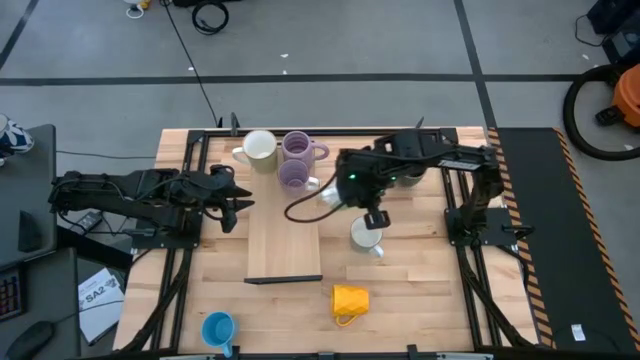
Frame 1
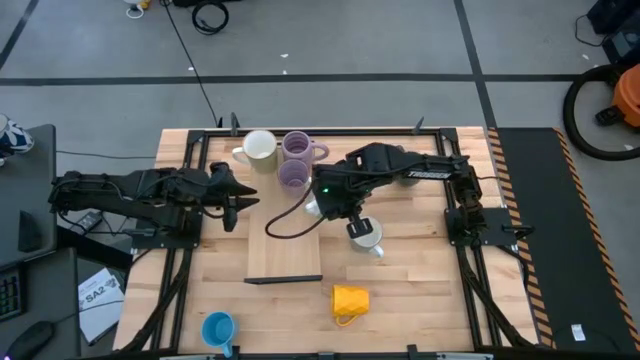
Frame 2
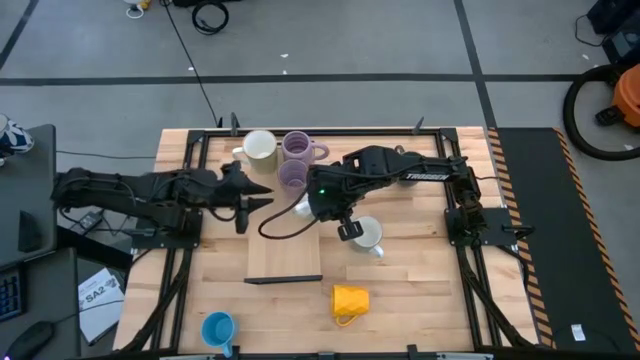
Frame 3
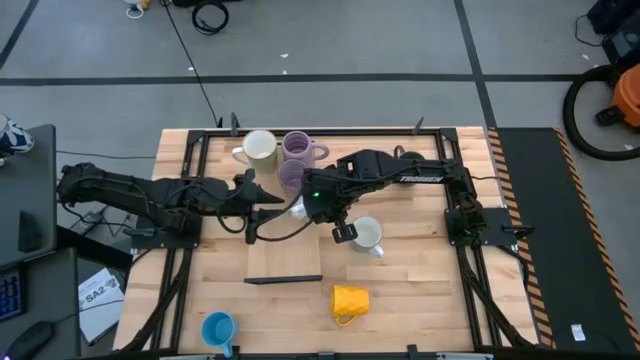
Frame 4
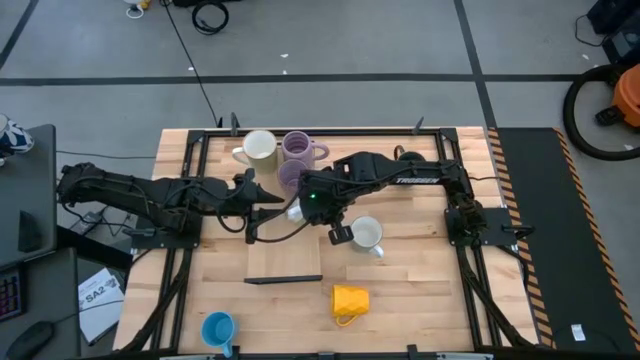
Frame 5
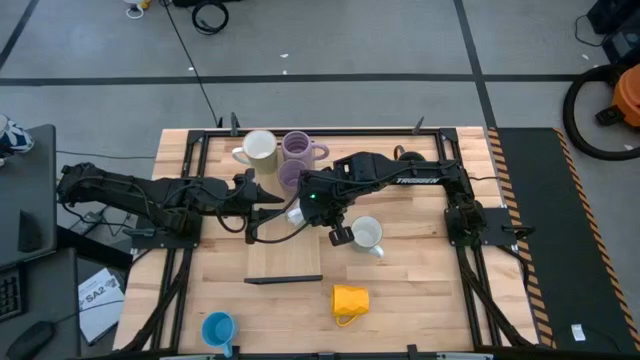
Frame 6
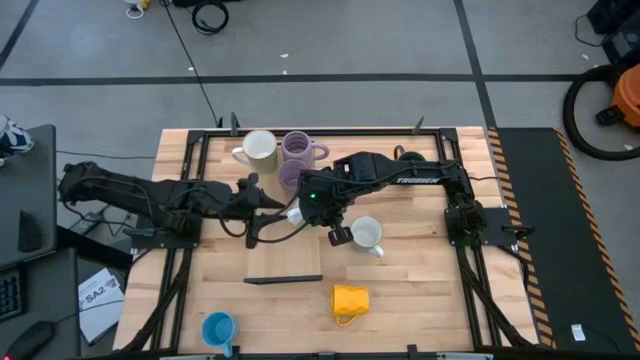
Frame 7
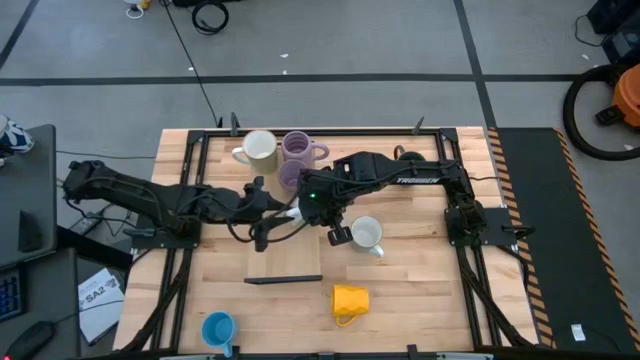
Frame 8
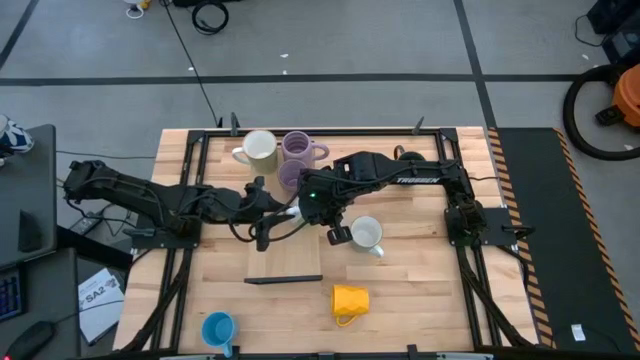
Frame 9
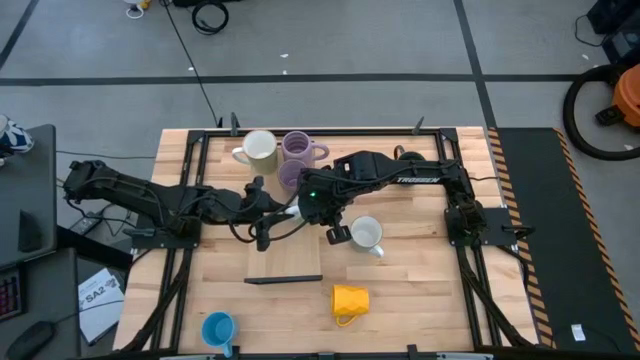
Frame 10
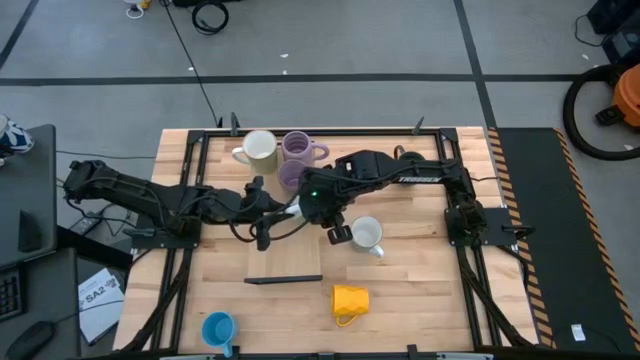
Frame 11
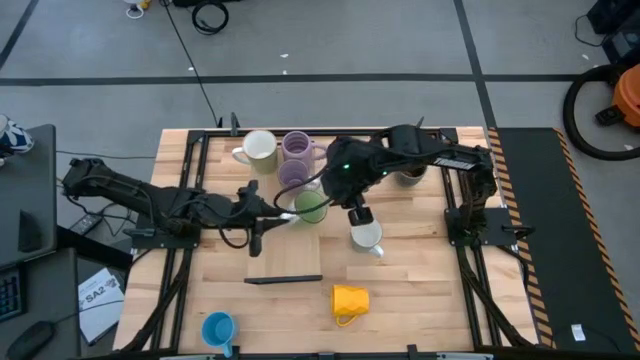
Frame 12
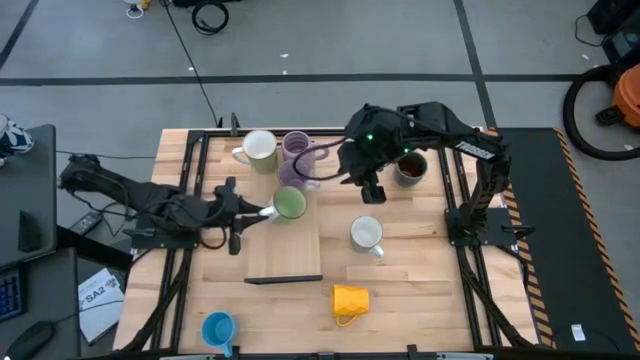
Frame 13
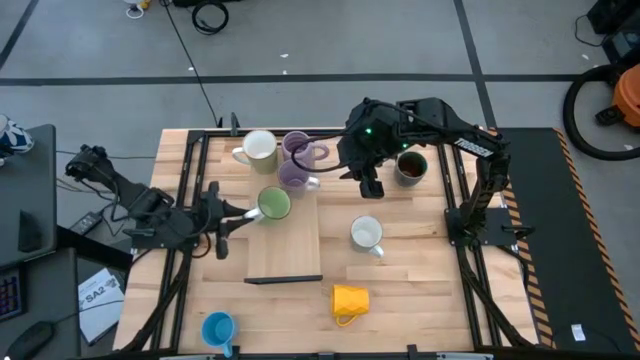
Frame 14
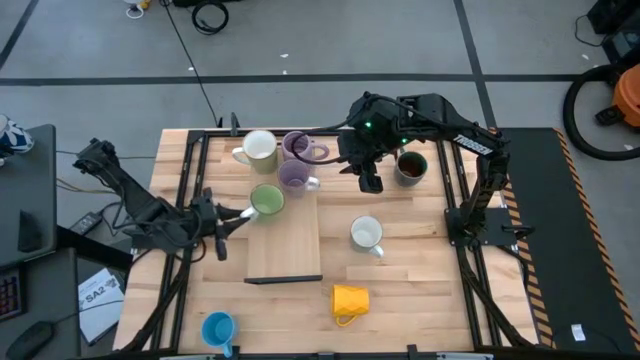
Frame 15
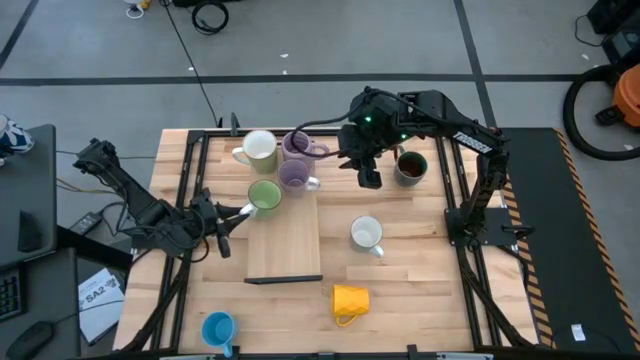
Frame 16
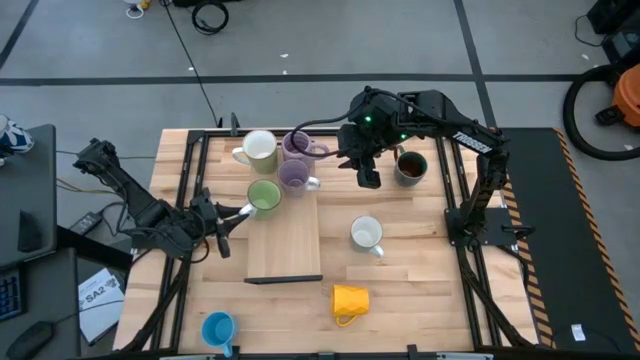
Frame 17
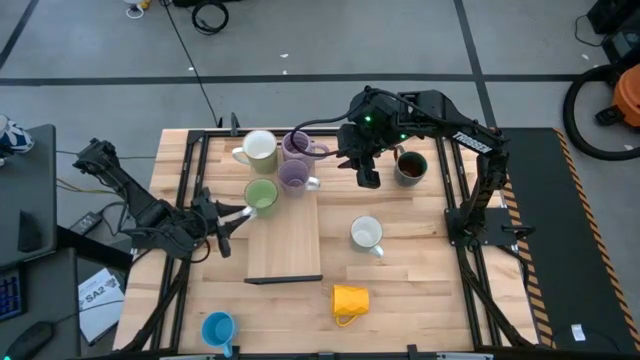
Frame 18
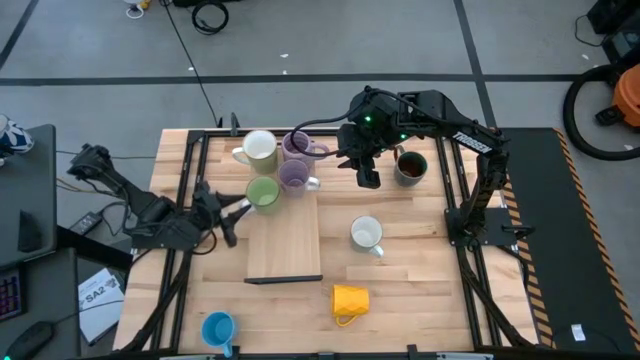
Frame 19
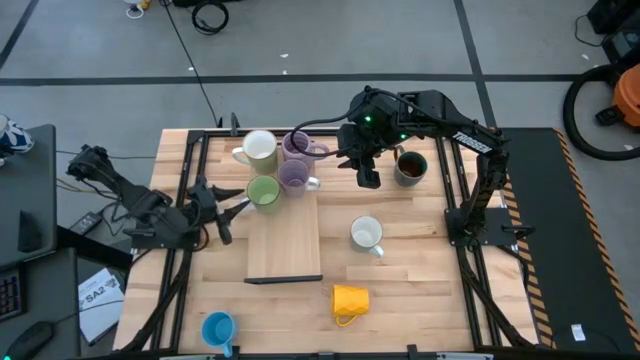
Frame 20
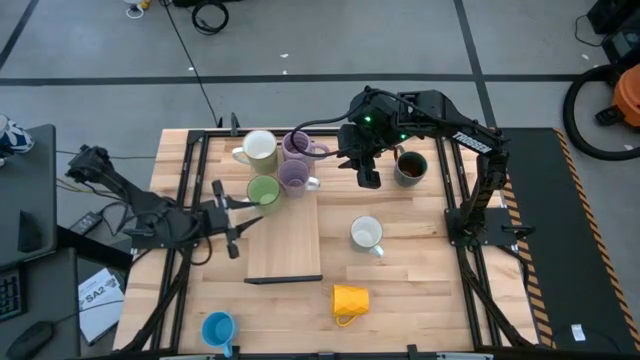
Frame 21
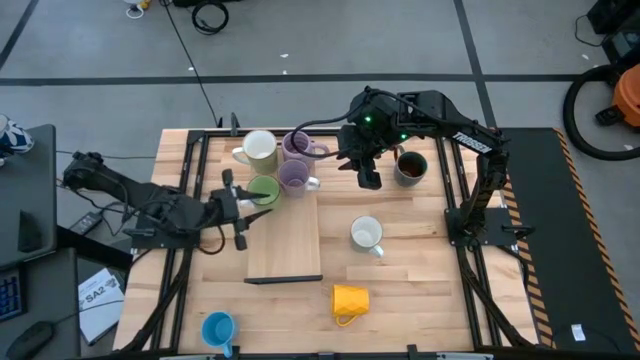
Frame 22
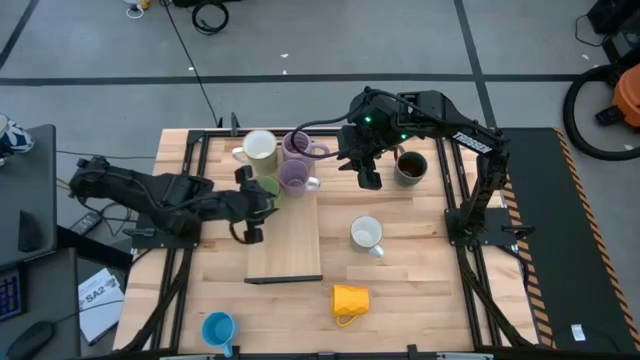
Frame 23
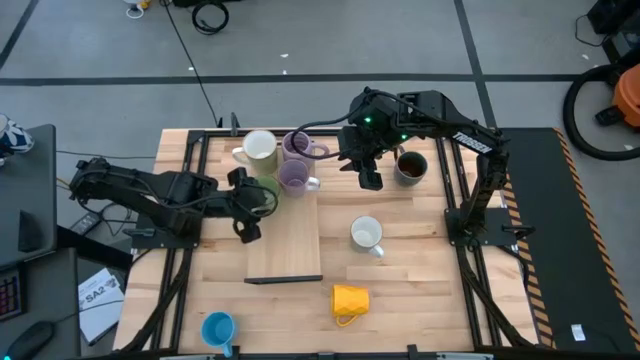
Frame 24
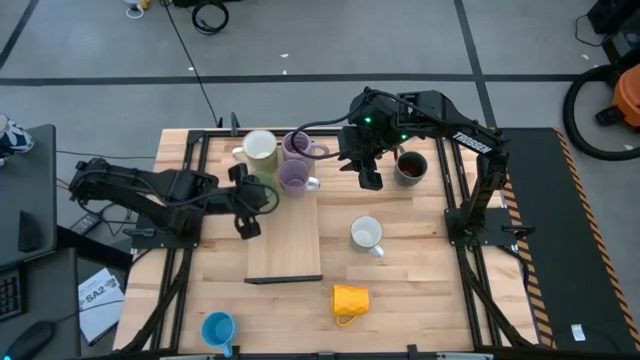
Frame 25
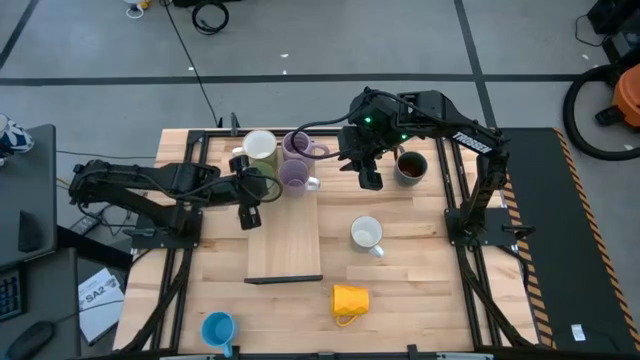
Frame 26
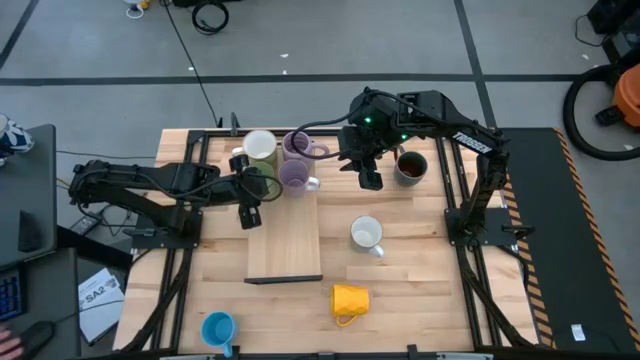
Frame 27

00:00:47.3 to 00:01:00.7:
Task: Place coffee mugs
Put the green mug on the shelf

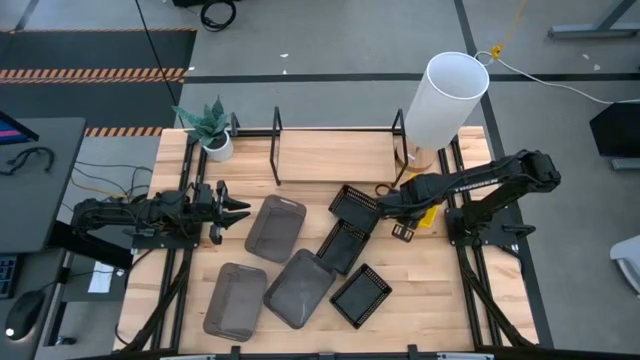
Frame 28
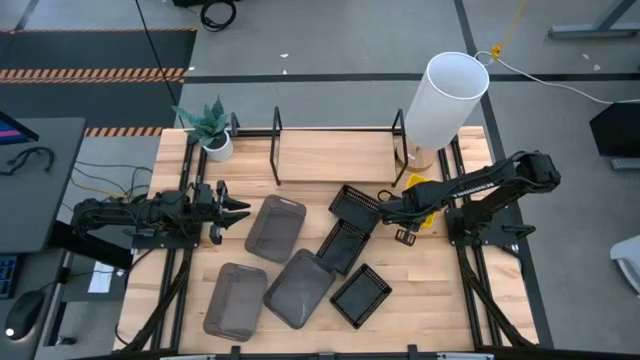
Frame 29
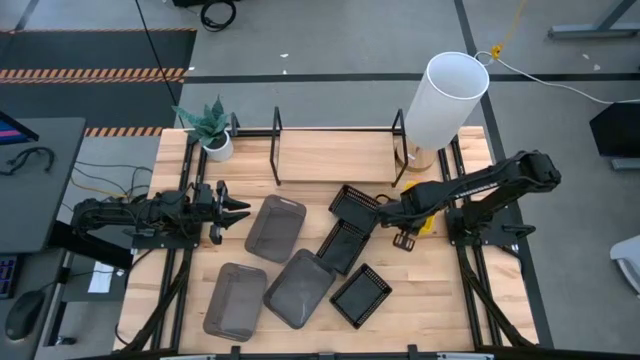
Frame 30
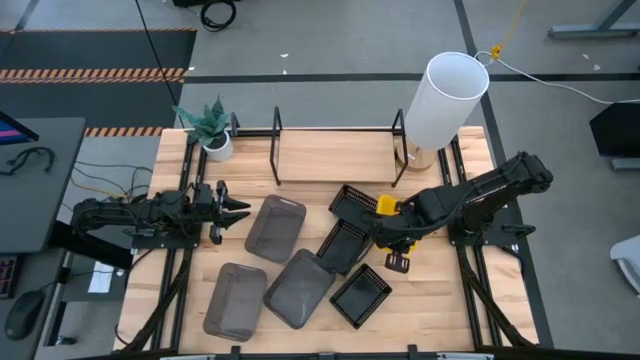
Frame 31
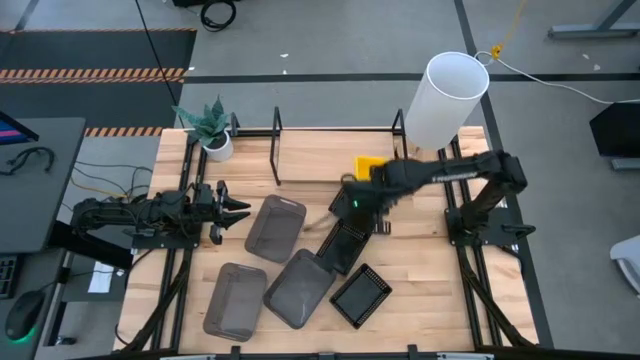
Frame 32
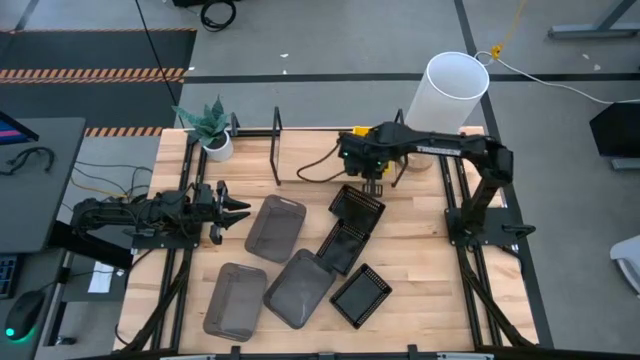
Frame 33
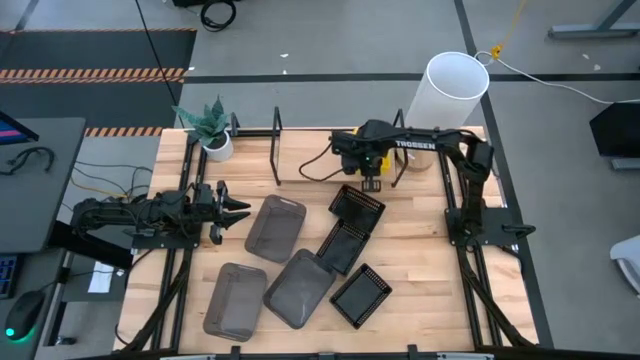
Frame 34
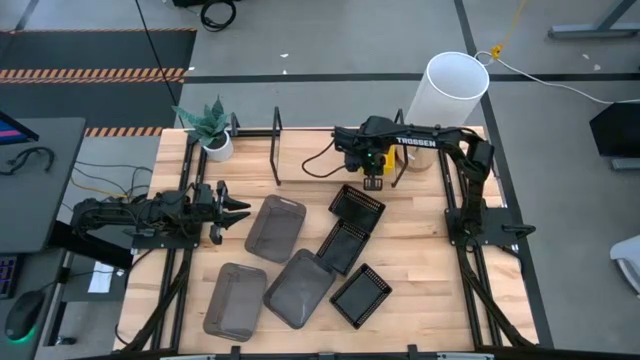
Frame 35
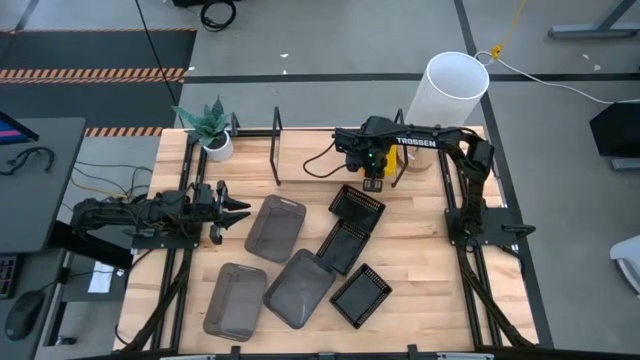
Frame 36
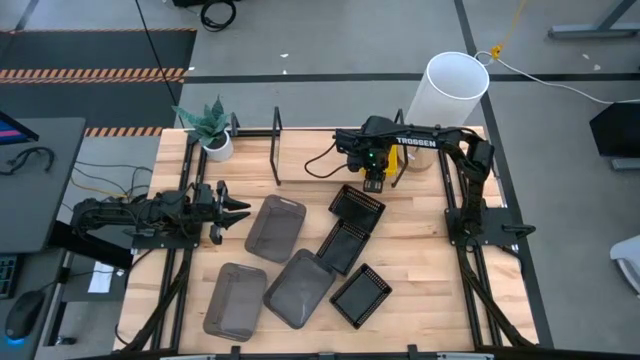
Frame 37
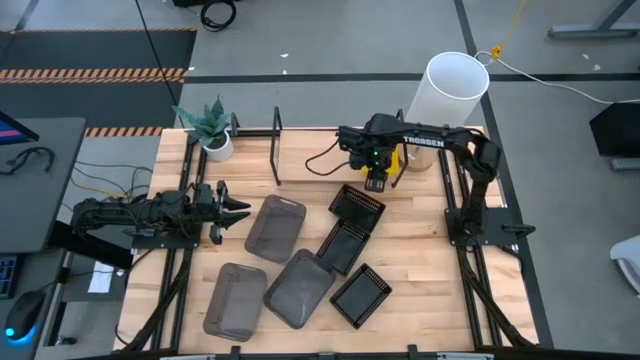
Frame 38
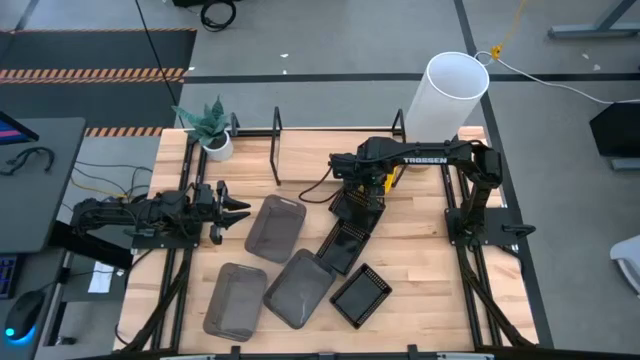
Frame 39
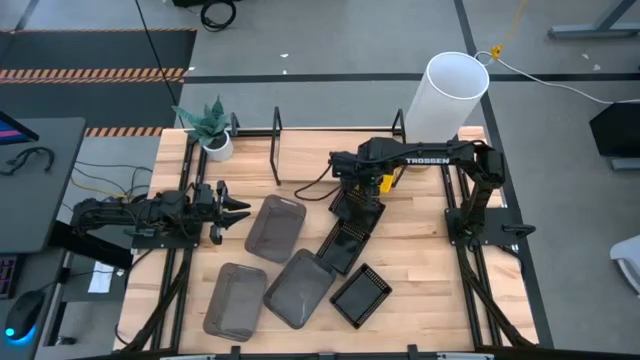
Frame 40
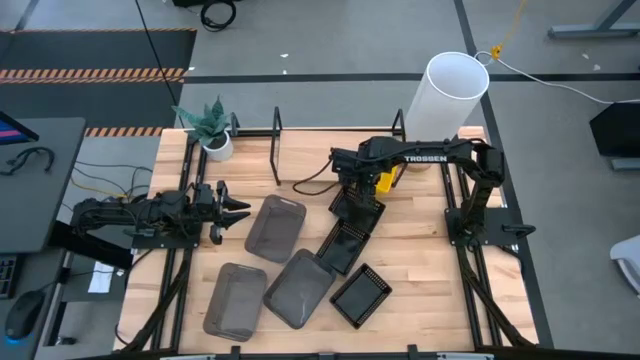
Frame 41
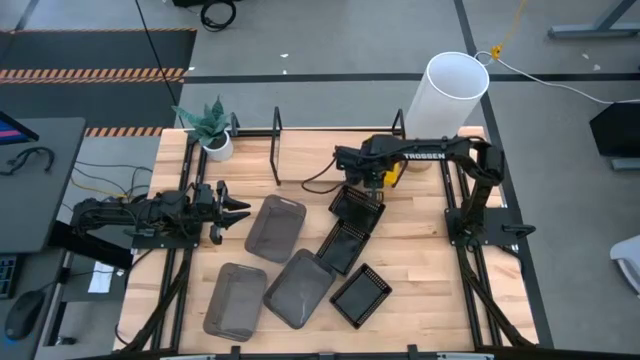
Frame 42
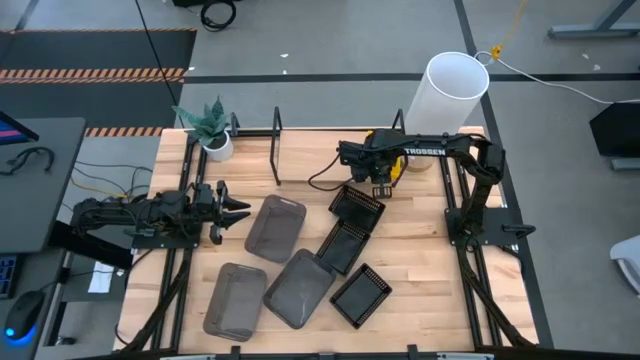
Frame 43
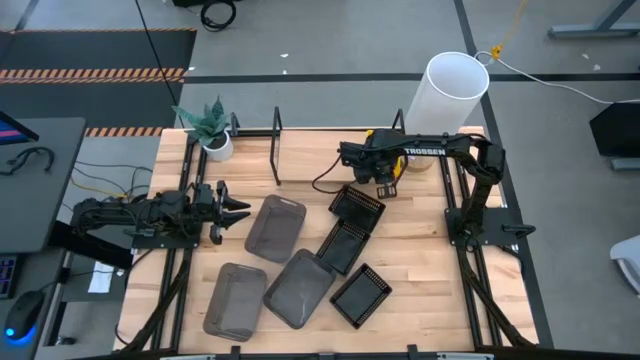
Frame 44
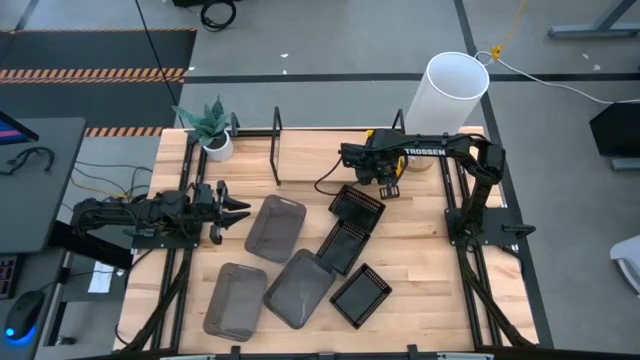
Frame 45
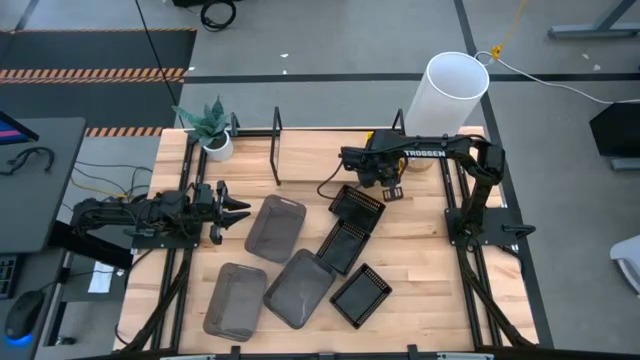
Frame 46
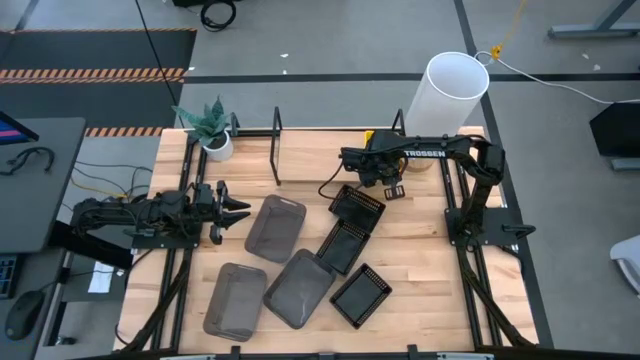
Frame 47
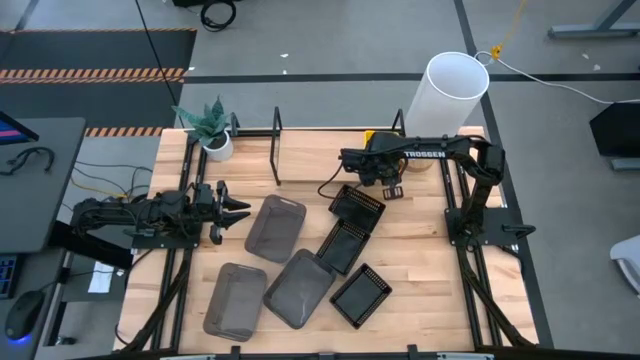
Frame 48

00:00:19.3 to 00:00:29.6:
Task: Stack baskets on shelf by color
Put the stacked yellow bins on the shelf
